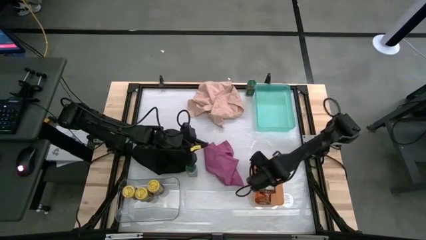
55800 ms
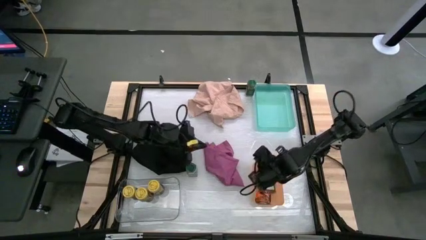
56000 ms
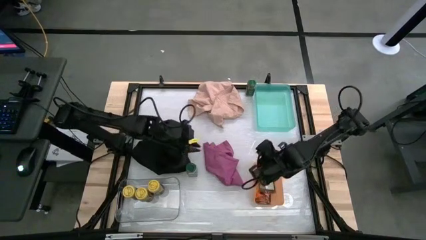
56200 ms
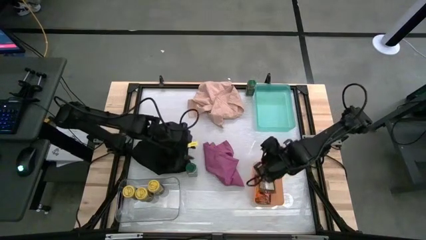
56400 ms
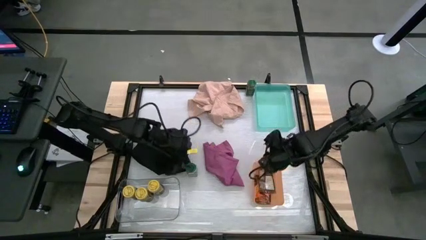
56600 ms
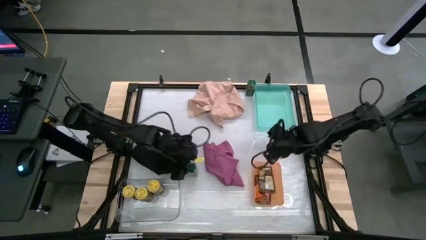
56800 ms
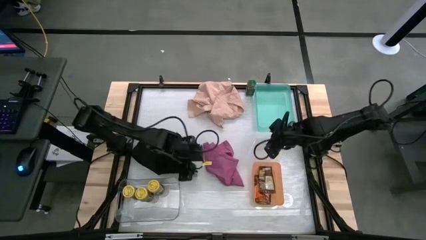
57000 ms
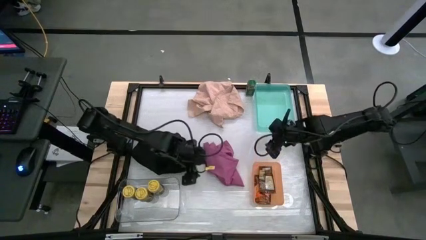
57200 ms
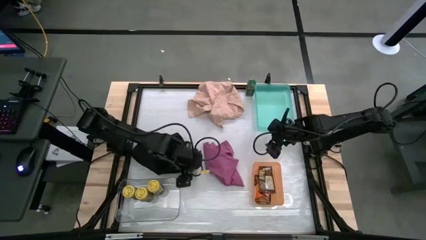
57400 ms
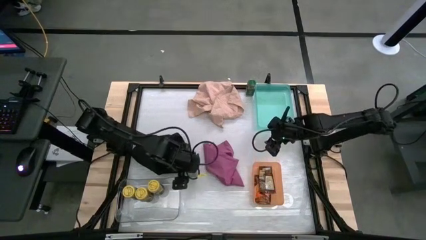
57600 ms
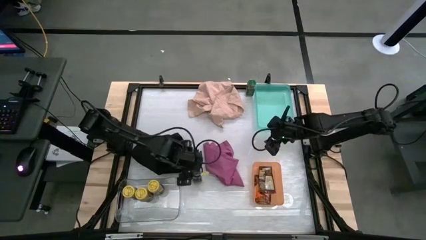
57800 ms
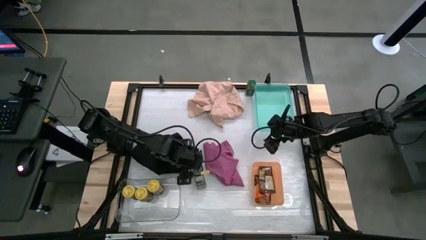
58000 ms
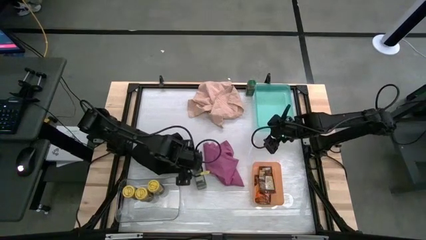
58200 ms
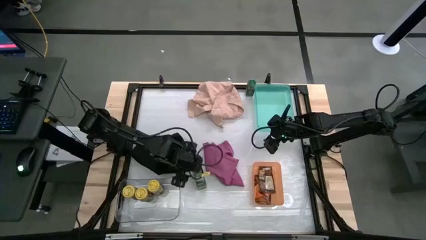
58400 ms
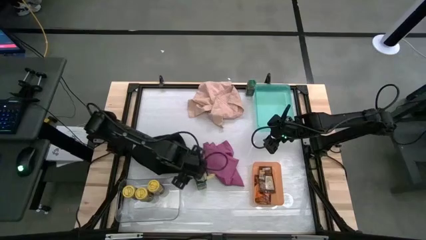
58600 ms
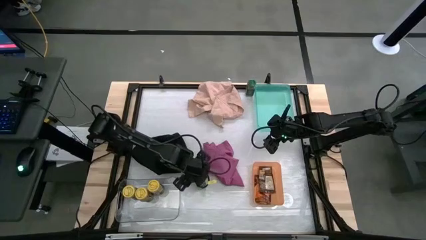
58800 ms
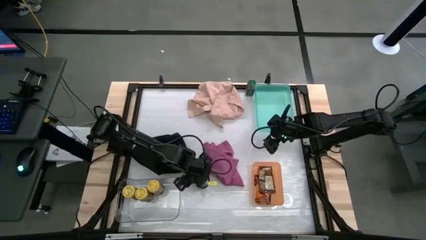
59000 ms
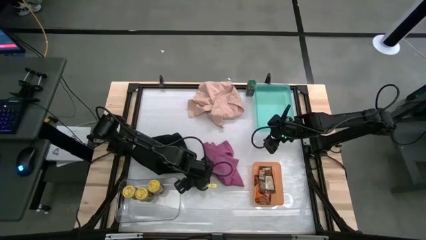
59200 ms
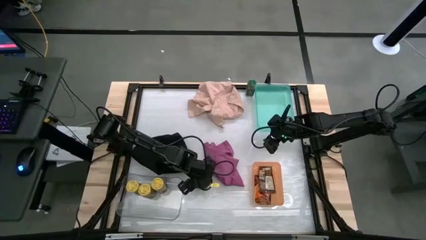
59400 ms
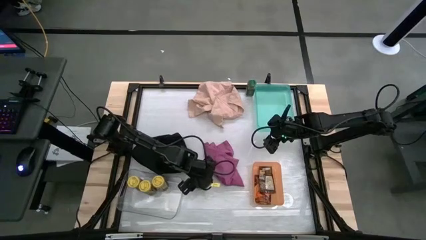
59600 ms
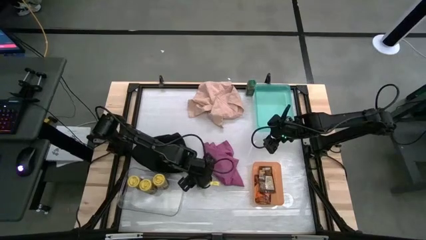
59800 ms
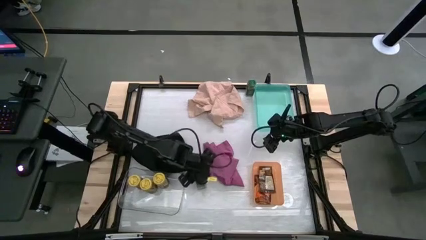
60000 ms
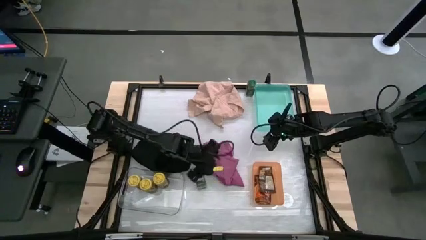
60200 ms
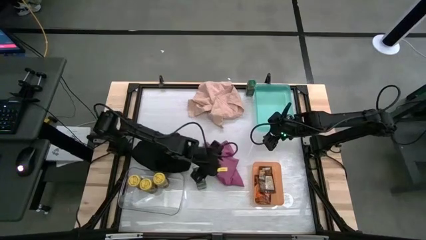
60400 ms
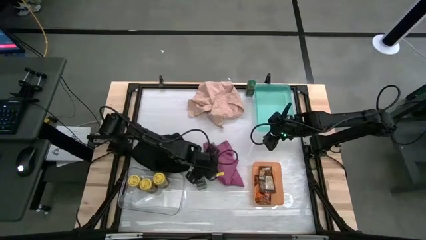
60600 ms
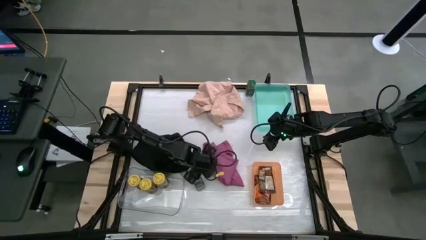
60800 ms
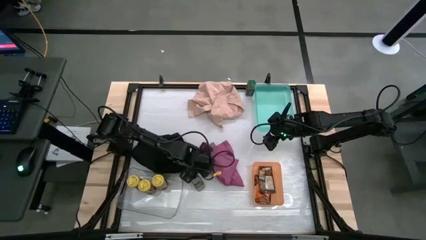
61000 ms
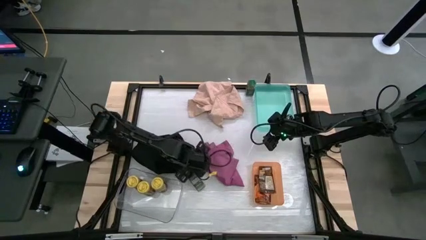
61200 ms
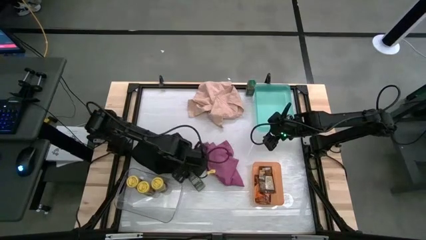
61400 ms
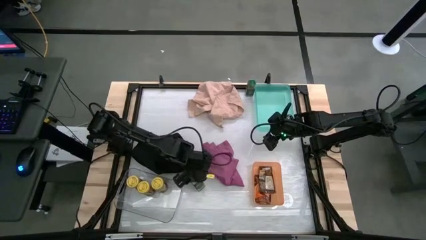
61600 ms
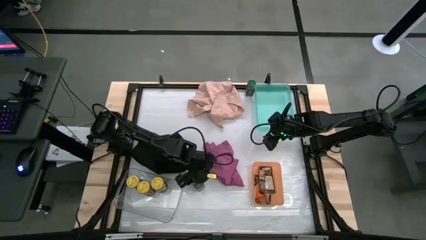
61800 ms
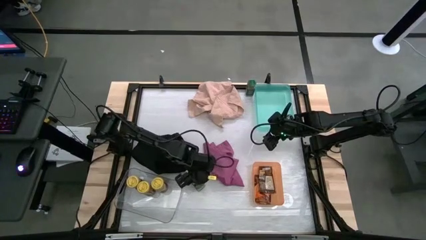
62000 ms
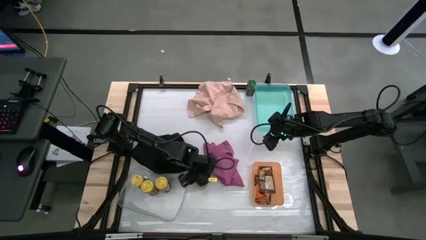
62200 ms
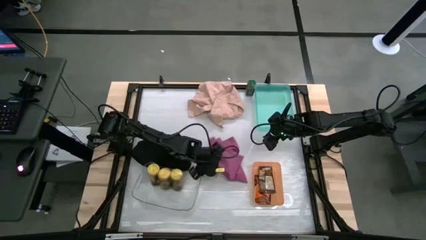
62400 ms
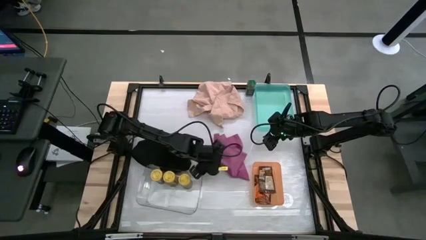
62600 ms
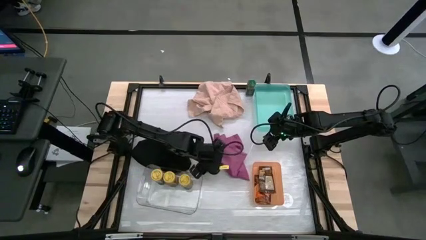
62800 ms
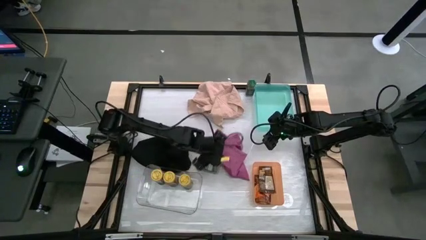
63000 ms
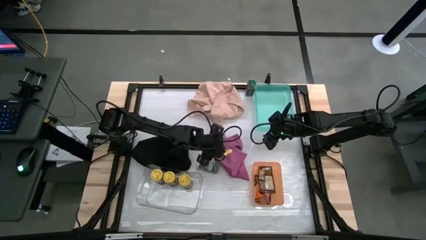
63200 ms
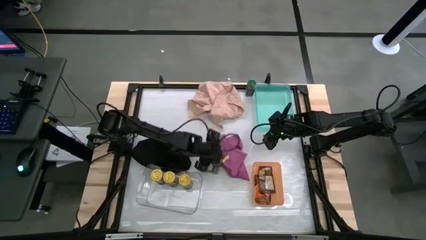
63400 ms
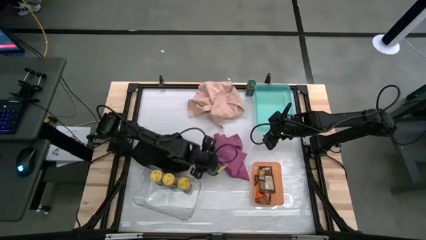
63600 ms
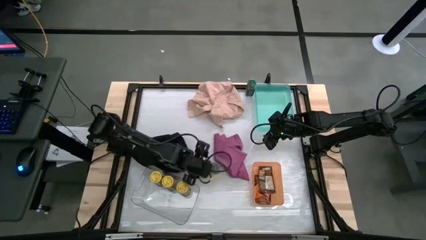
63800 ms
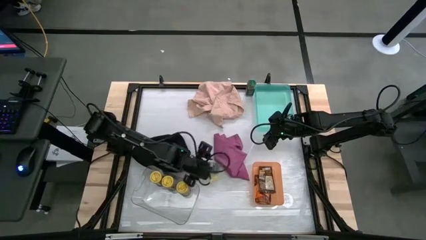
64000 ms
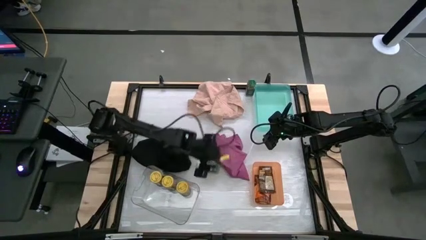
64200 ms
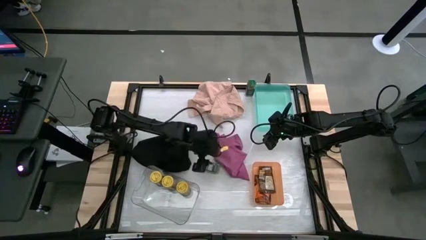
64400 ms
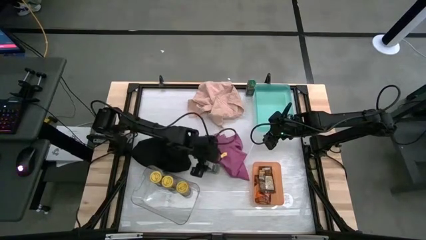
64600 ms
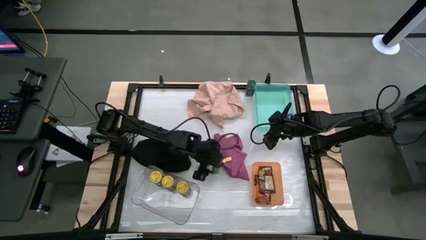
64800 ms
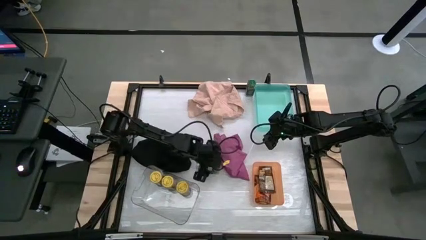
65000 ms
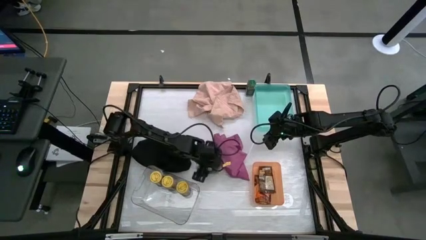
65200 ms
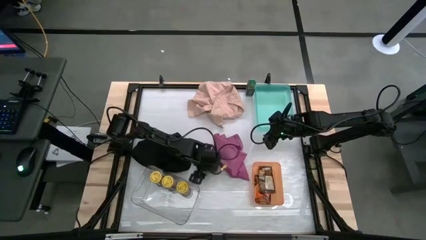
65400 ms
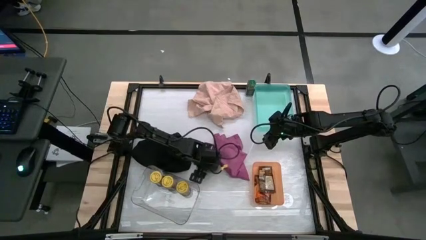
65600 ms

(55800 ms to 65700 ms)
Task: Sort spices by type
Put the bottom green seasoning bottle into the green bin

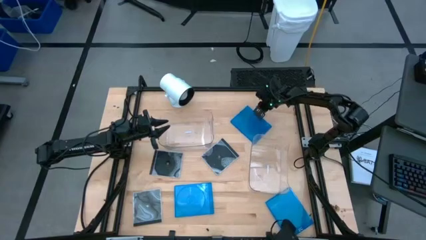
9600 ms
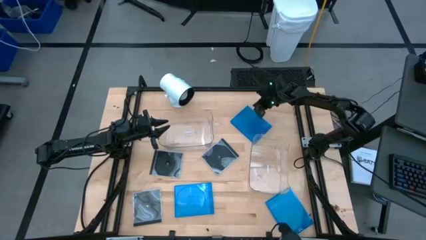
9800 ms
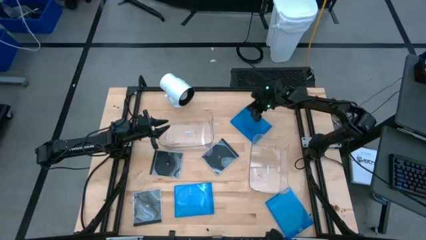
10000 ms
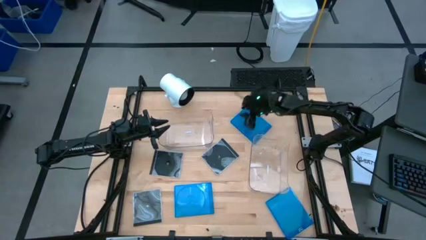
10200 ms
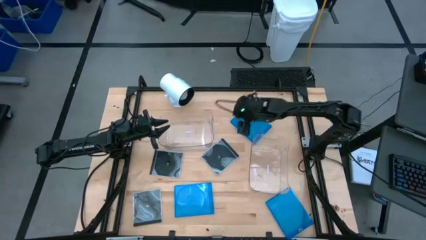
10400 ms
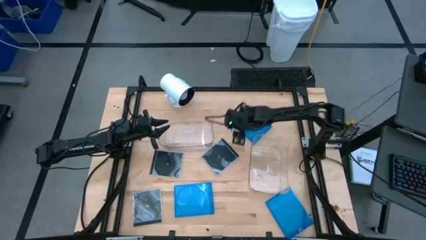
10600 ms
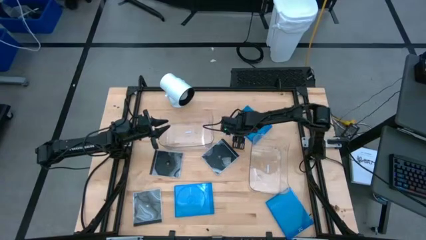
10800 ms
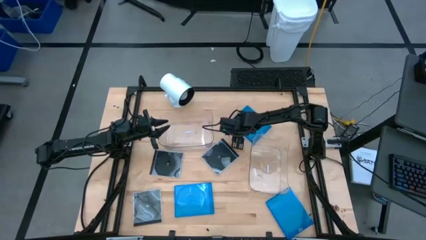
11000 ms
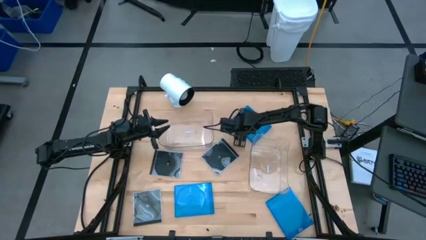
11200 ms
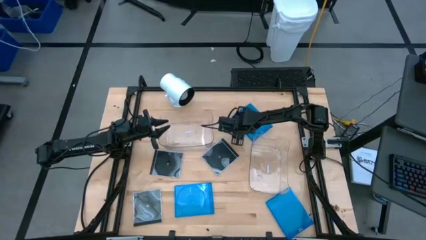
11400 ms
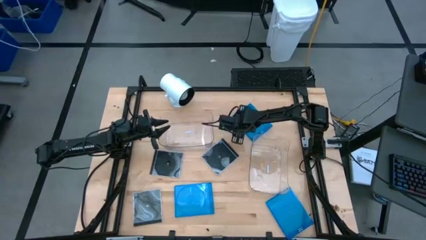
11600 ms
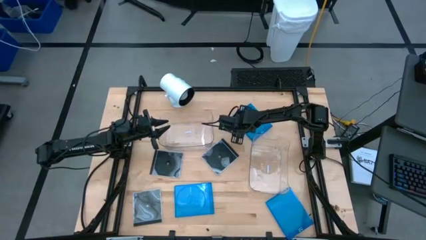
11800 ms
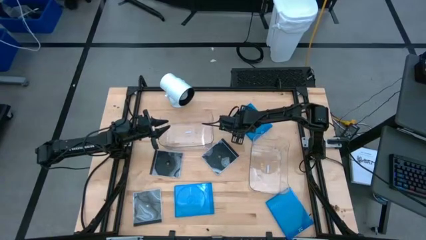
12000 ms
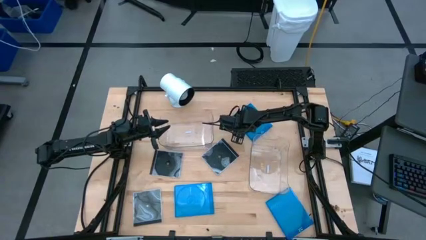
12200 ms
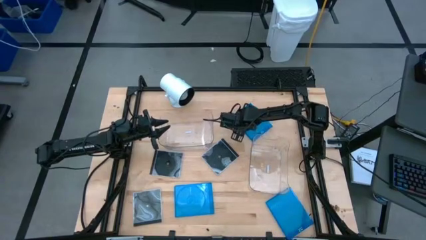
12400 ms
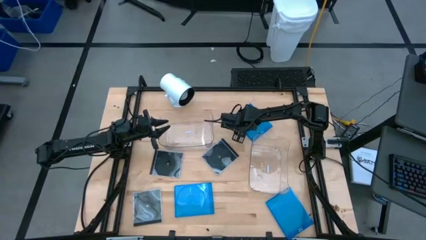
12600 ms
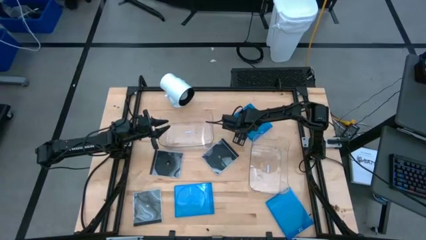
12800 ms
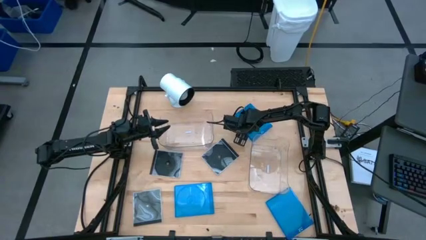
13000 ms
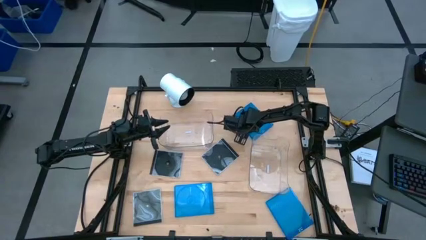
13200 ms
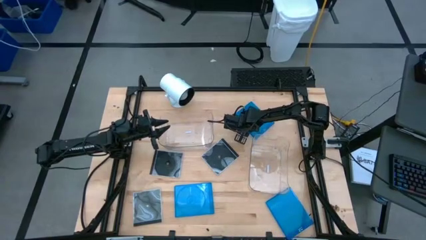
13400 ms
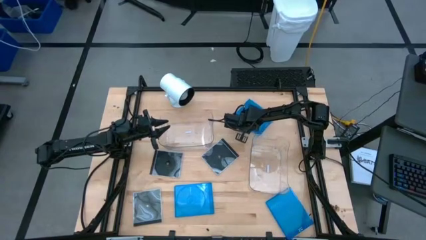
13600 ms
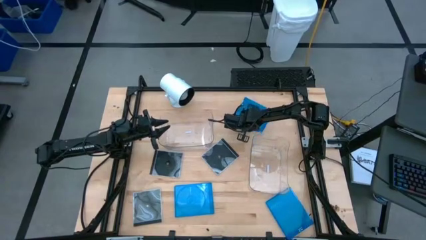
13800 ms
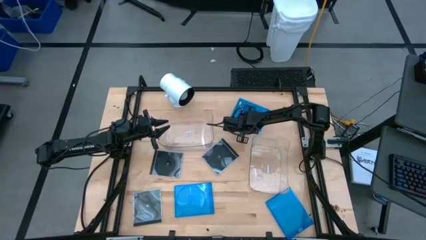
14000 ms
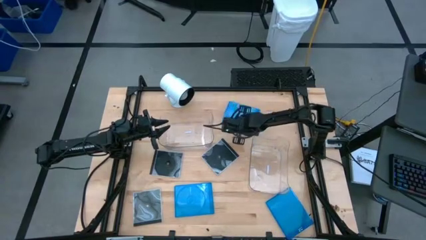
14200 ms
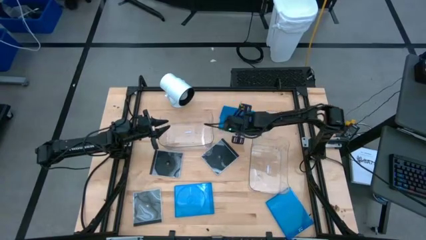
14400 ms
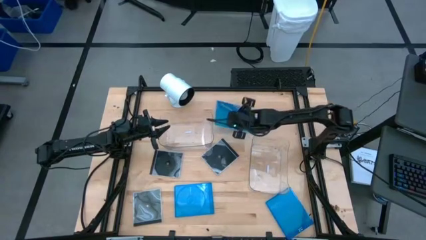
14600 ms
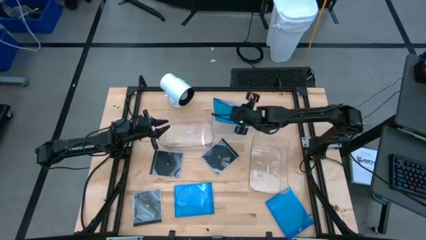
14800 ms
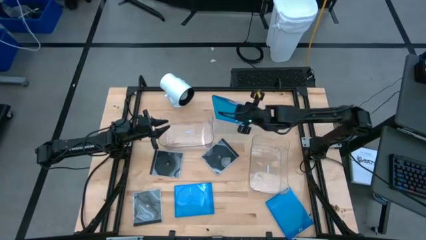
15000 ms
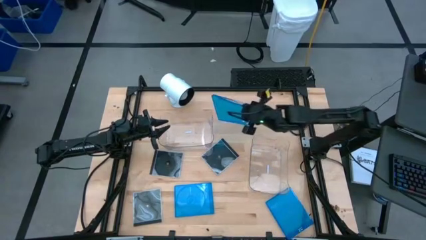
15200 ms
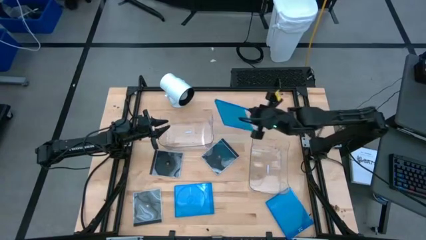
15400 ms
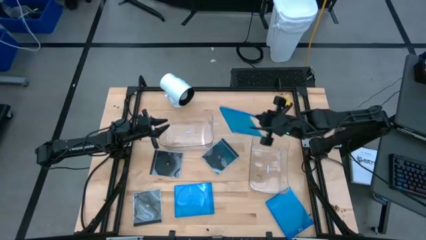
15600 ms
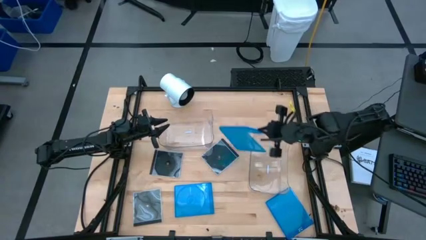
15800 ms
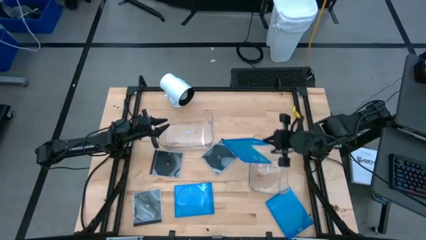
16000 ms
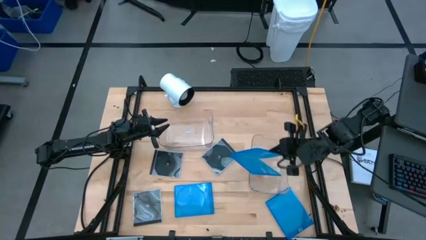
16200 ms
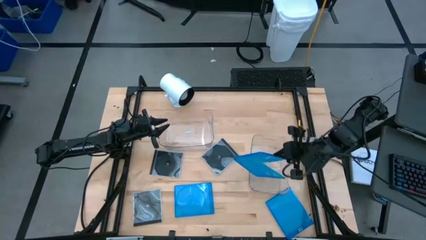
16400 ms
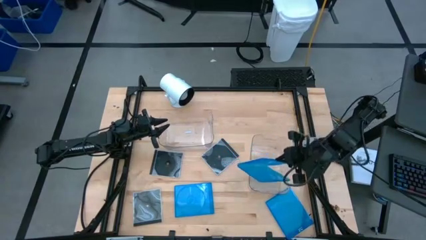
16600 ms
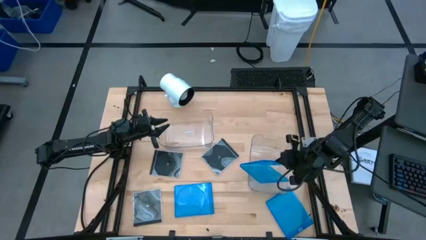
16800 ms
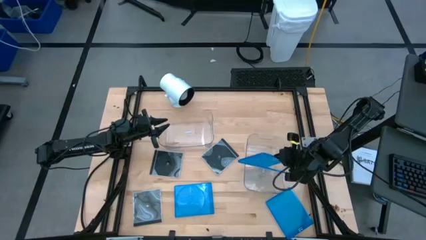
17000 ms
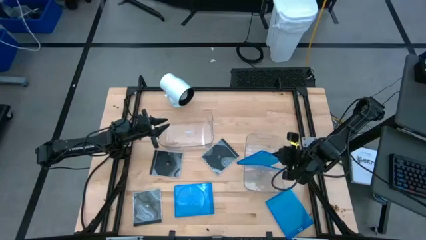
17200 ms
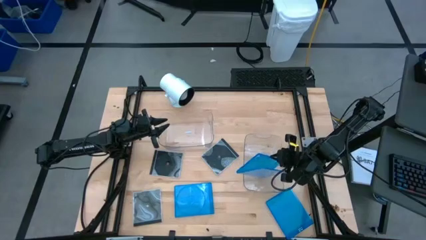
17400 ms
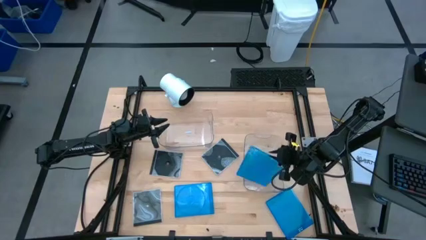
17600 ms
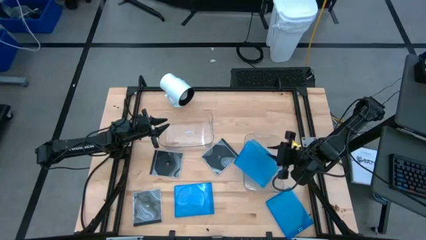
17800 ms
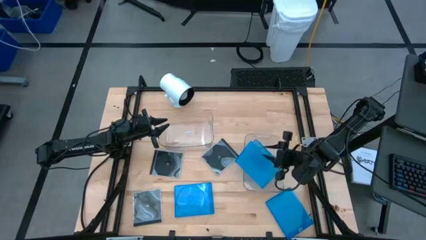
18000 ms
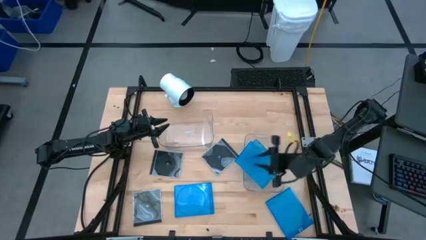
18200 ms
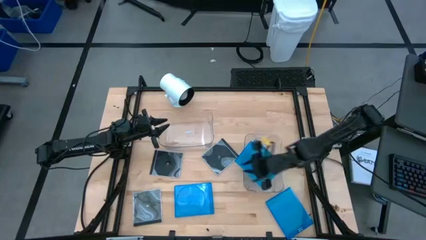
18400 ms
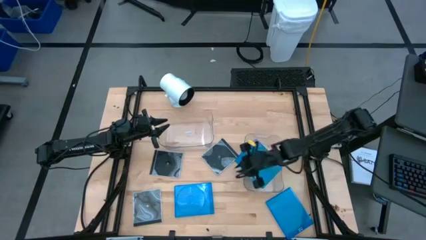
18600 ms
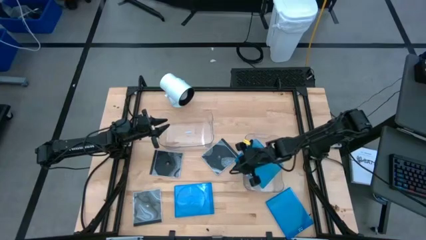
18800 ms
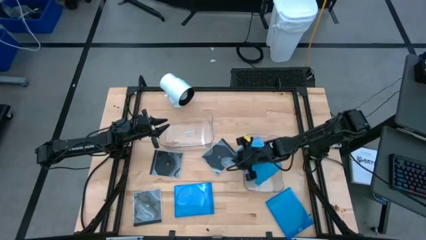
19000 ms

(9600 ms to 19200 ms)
Task: Pick & place jewel cases by type
Put the top blue cd case into the right transparent bin
